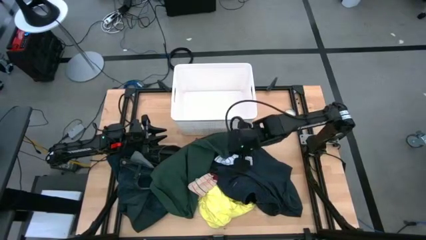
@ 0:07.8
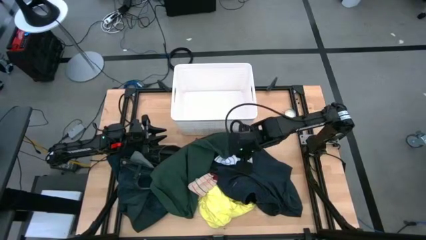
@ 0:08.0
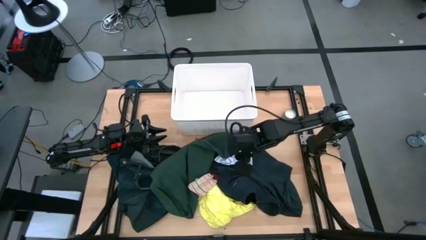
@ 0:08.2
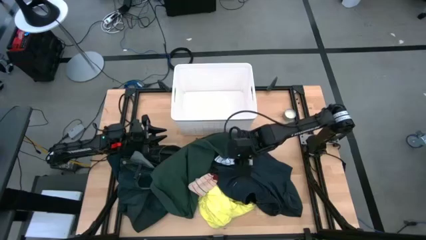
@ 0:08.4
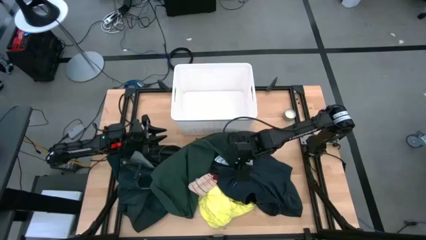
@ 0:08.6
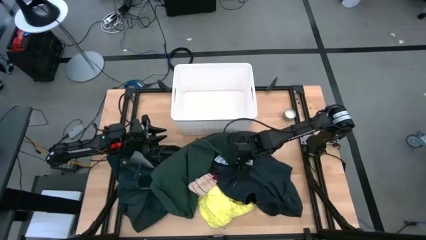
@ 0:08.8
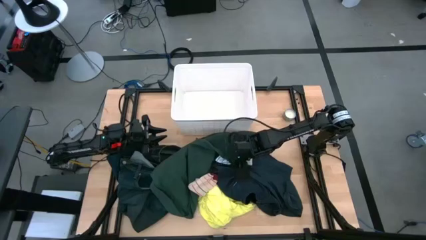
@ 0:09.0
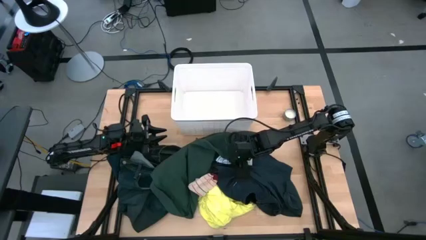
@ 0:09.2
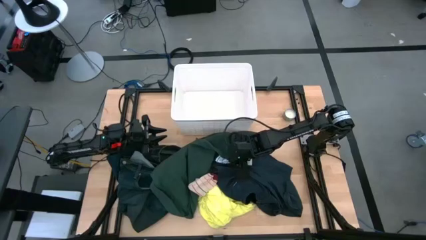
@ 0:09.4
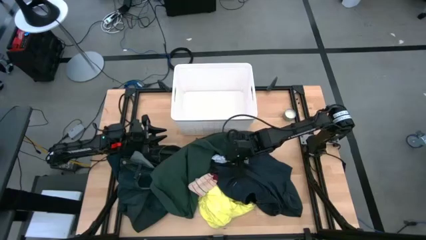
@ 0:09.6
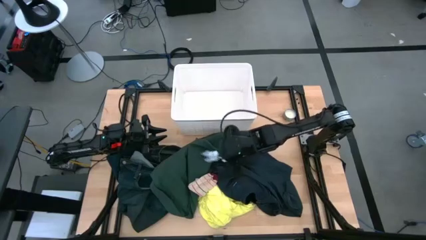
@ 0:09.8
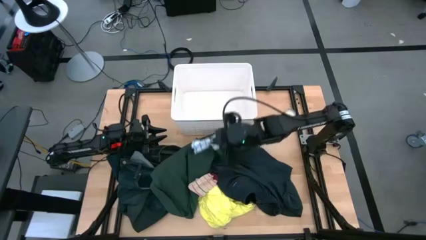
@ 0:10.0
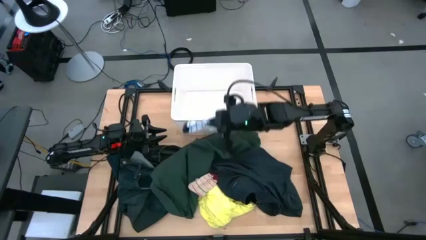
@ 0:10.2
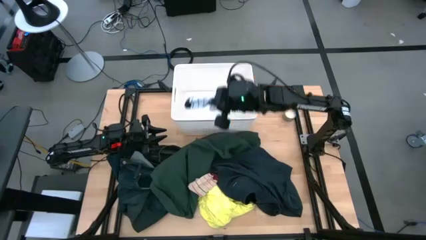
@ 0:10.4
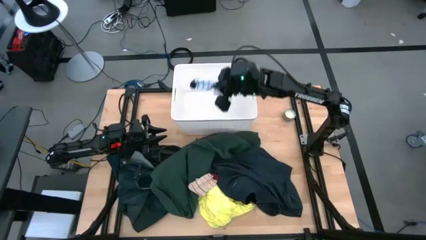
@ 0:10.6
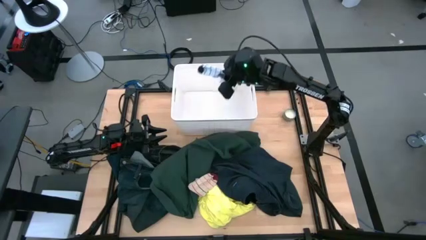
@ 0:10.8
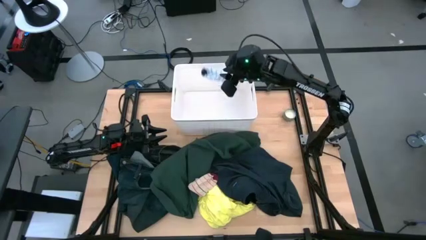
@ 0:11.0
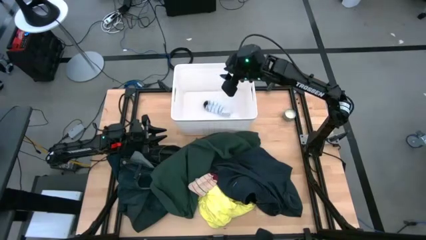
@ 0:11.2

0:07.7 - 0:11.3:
Task: Sort clothes
Put the white sock into the white bin

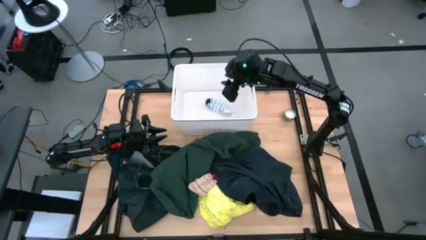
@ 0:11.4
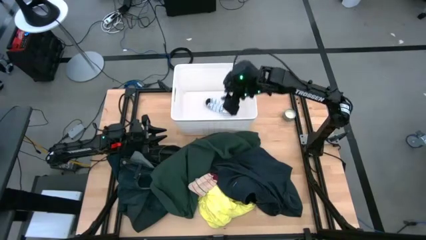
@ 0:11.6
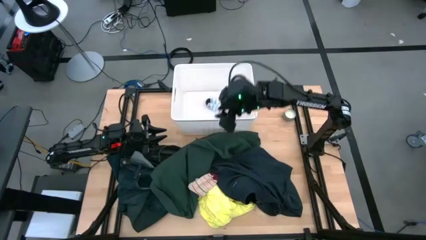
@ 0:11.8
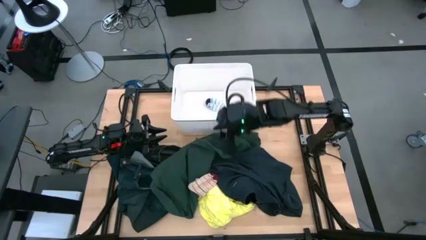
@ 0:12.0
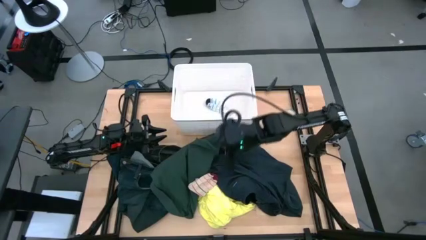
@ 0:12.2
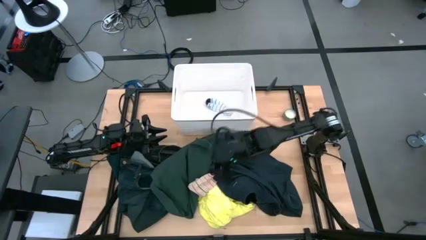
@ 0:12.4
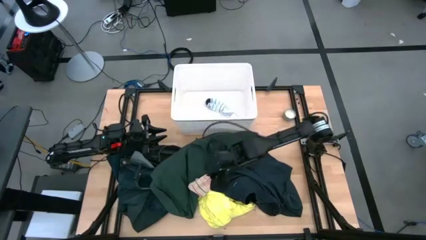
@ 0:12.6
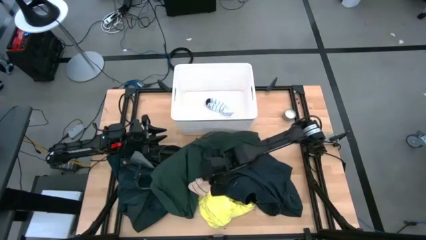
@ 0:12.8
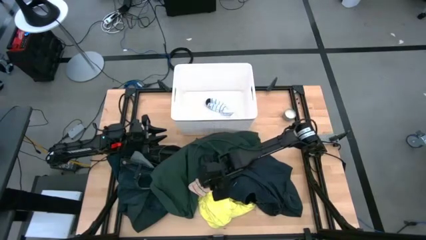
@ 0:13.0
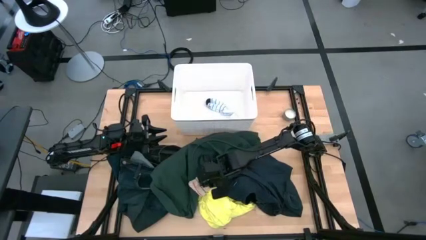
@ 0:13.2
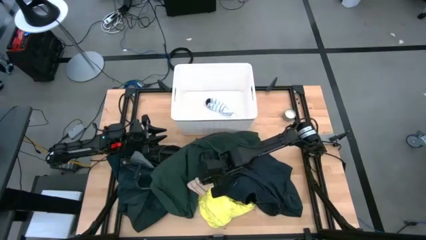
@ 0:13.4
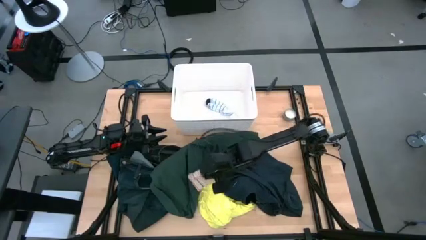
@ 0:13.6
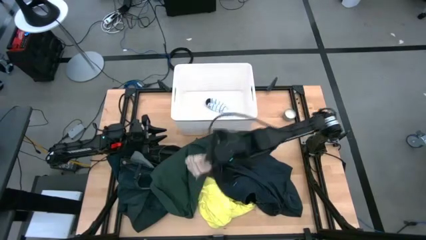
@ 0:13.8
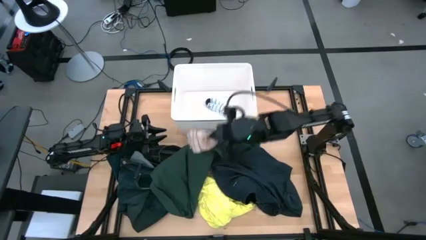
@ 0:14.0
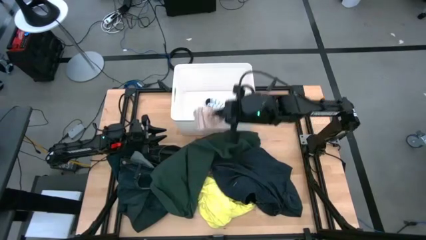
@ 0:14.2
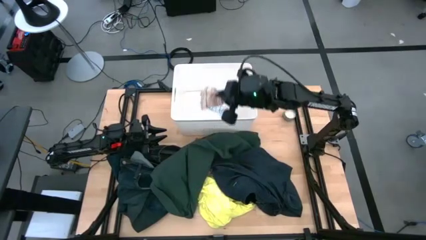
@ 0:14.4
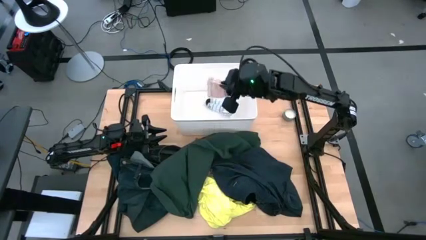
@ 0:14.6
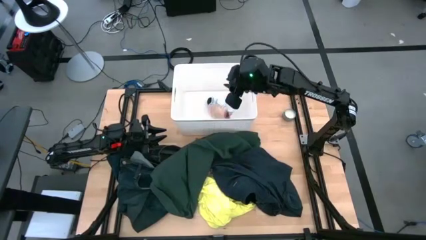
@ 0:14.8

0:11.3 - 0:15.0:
Put the pink sock into the white bin

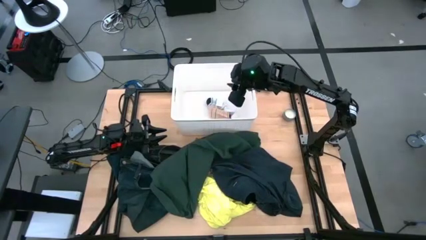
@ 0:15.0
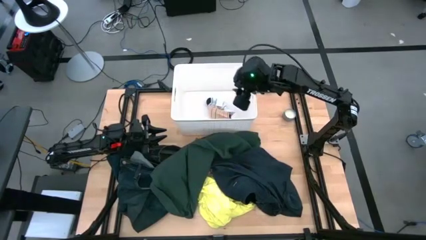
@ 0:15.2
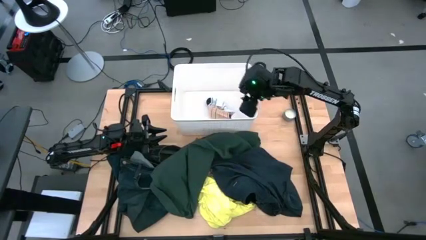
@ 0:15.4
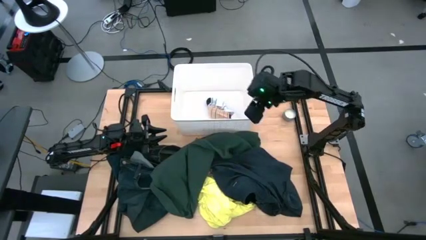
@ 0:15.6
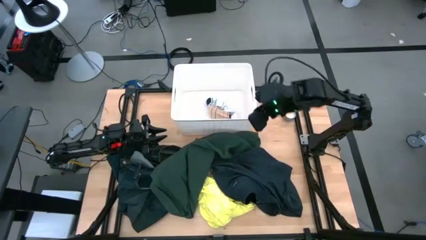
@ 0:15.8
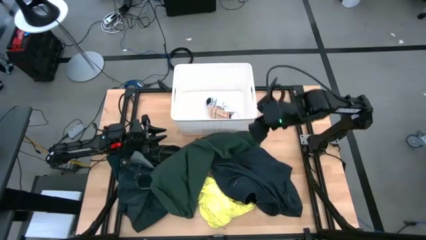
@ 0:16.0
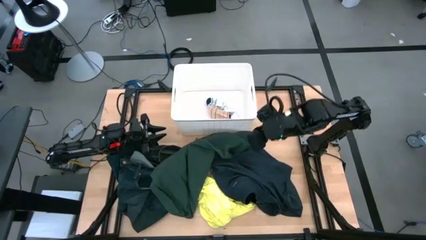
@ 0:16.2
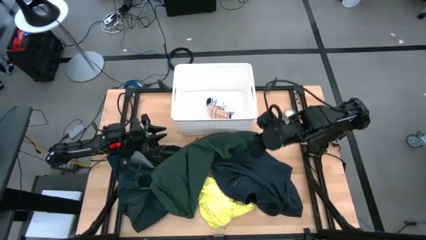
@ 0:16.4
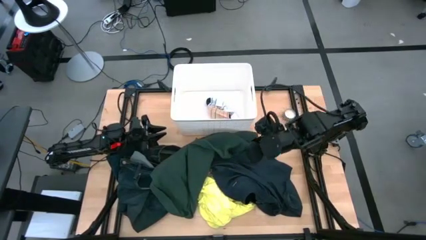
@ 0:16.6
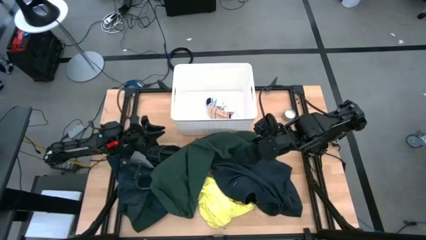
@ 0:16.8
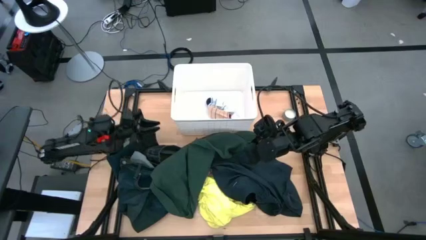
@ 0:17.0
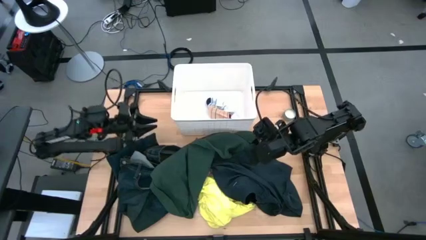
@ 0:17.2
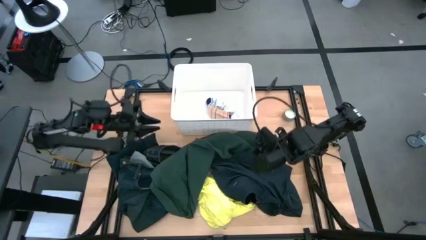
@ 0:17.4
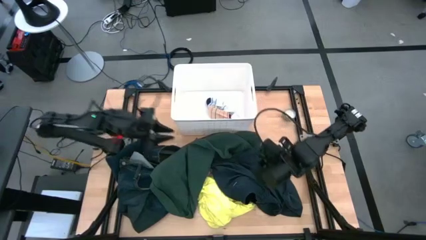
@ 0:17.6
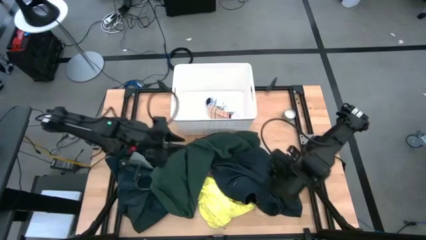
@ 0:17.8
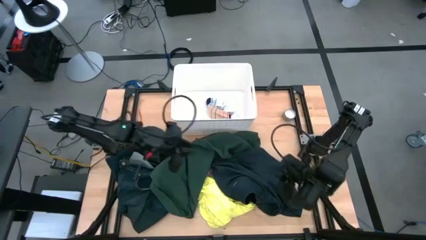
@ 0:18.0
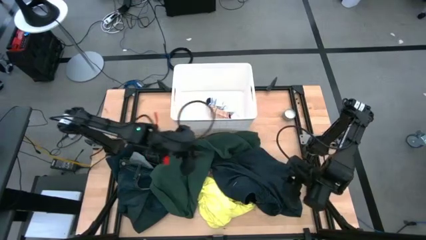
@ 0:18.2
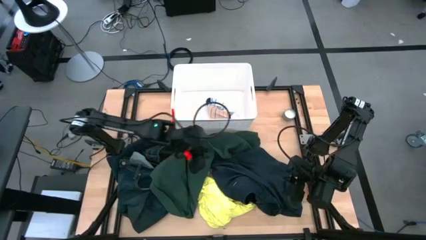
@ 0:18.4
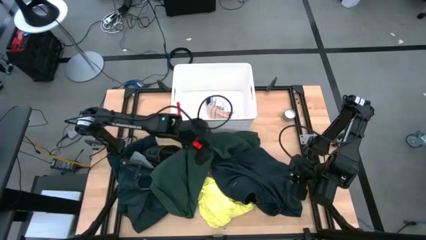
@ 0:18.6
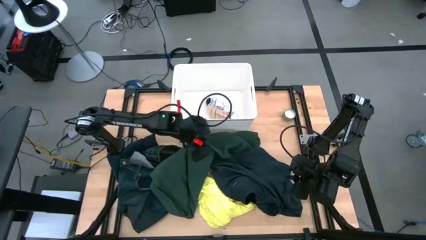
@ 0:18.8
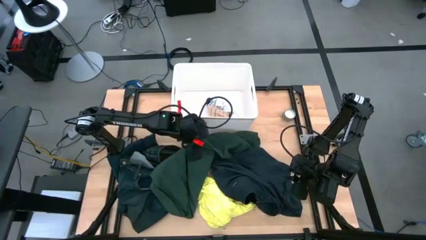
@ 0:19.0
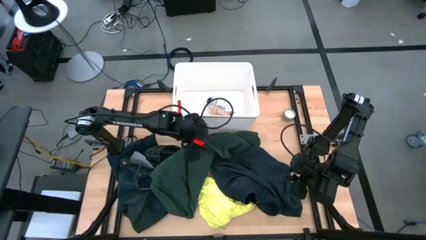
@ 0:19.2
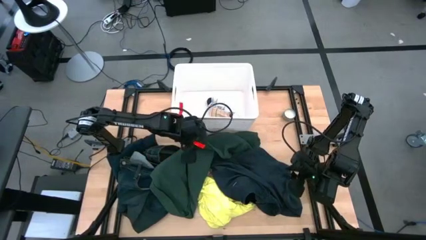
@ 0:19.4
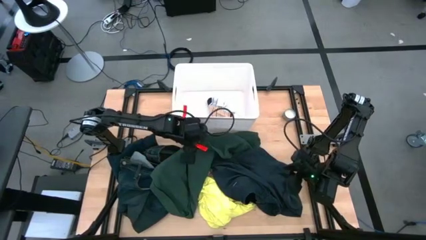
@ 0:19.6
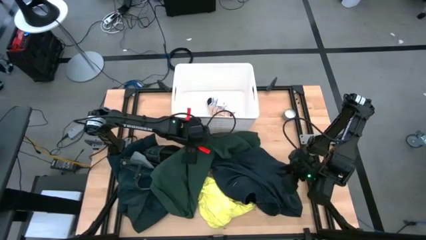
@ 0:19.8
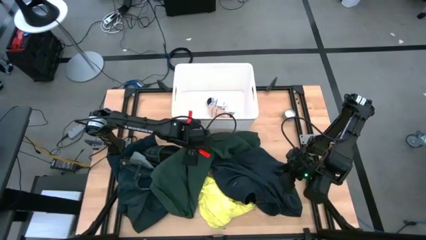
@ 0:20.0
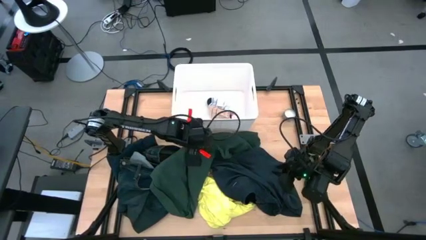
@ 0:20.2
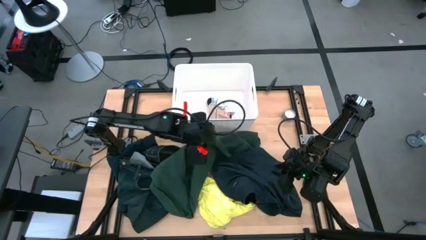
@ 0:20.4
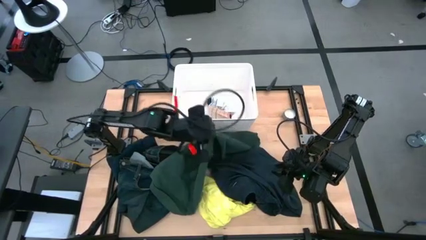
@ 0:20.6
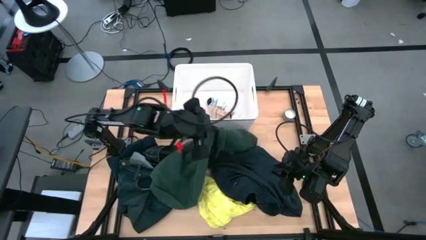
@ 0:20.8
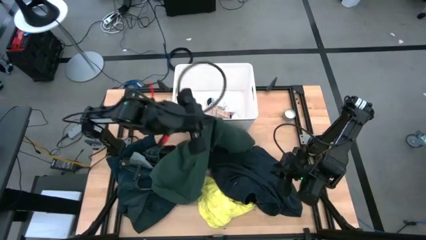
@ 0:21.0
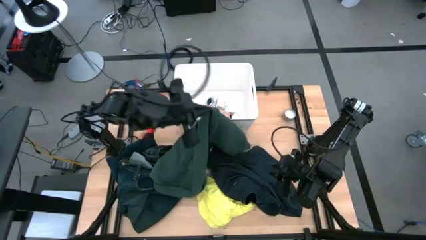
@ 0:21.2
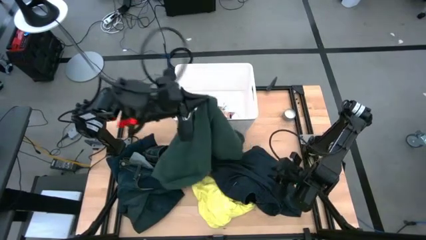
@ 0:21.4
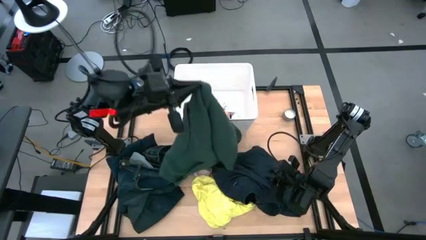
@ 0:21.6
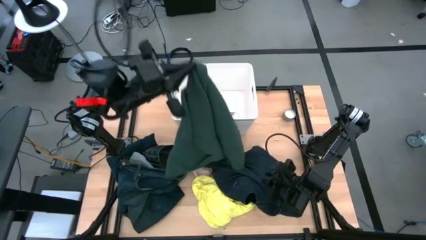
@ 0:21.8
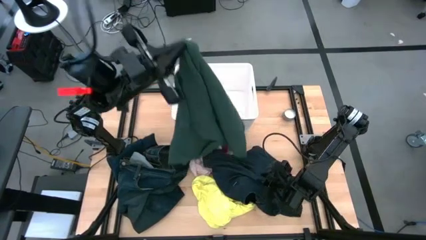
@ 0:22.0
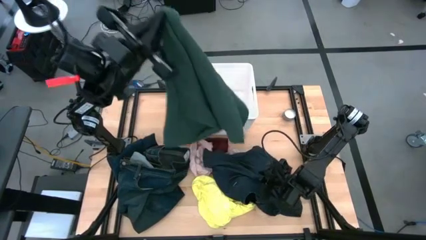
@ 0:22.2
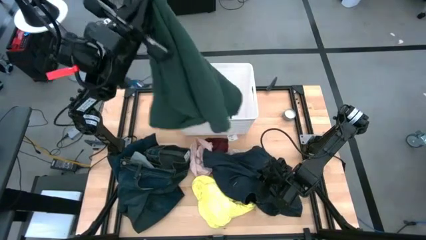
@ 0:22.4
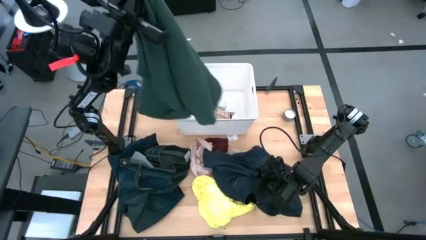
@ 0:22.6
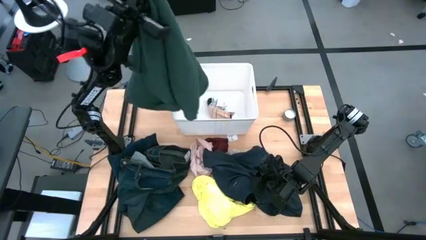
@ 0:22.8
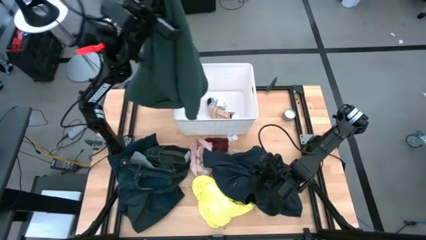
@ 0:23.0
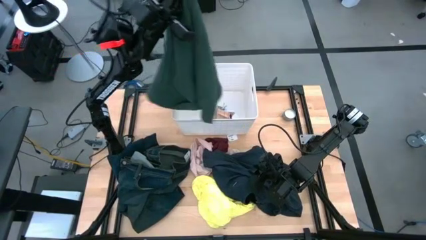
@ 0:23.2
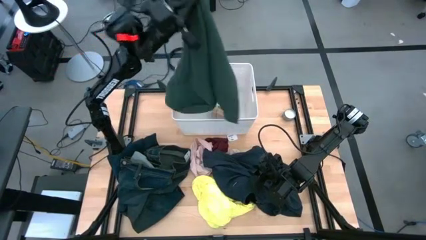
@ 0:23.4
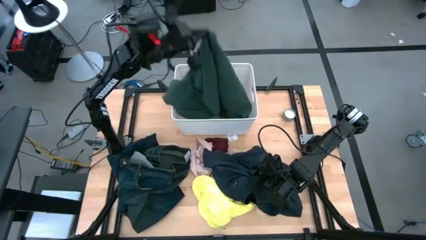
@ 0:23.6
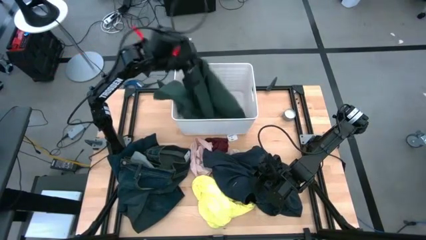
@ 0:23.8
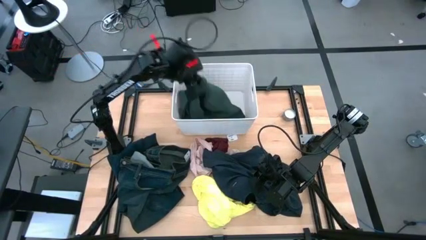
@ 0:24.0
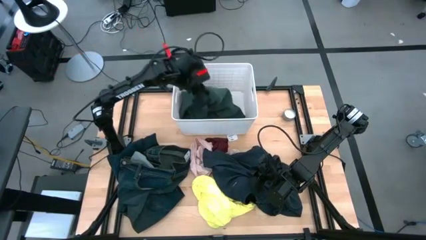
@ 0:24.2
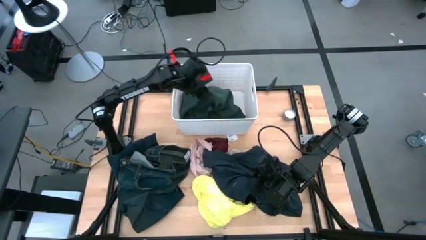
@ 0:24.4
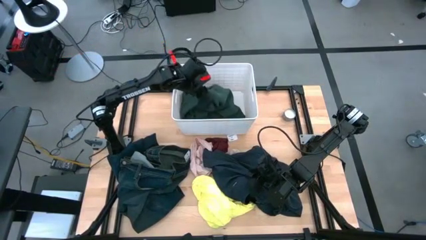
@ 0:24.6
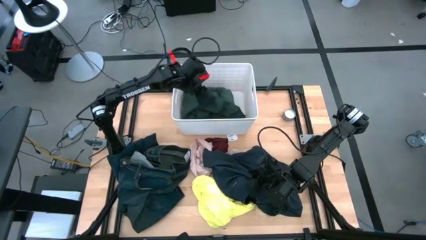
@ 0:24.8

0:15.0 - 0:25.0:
Put the green sweater into the white bin
